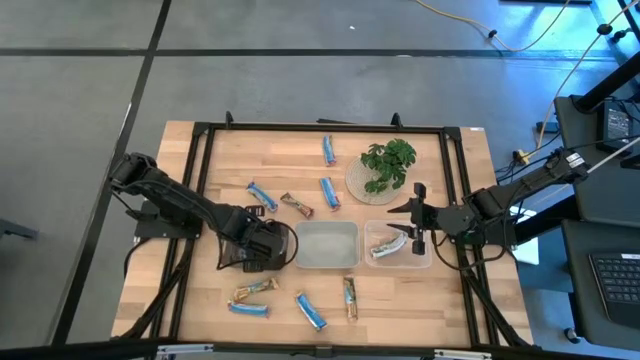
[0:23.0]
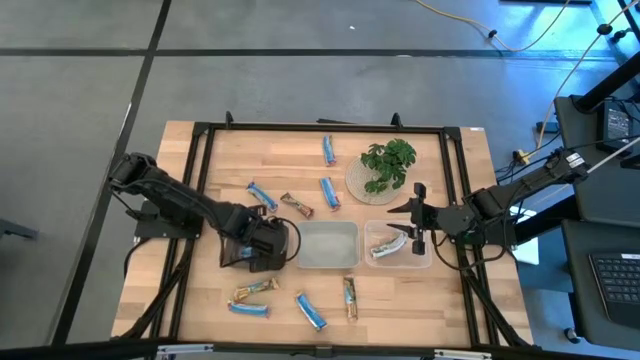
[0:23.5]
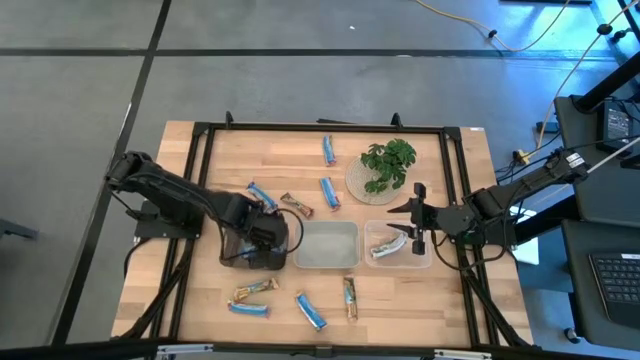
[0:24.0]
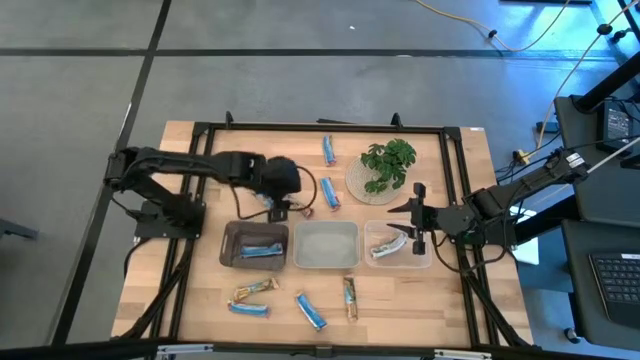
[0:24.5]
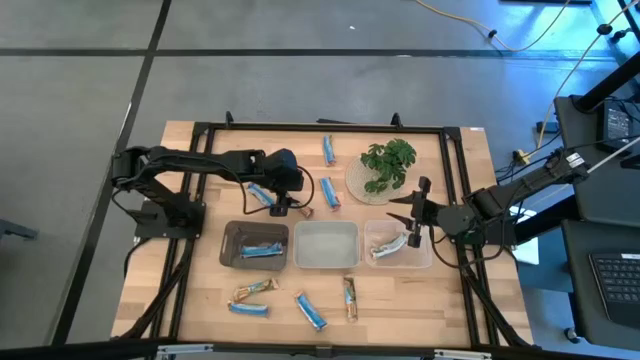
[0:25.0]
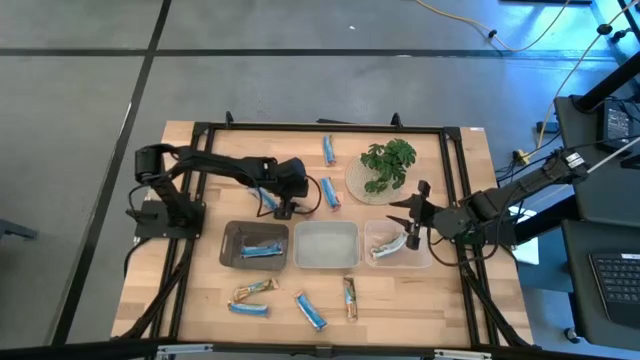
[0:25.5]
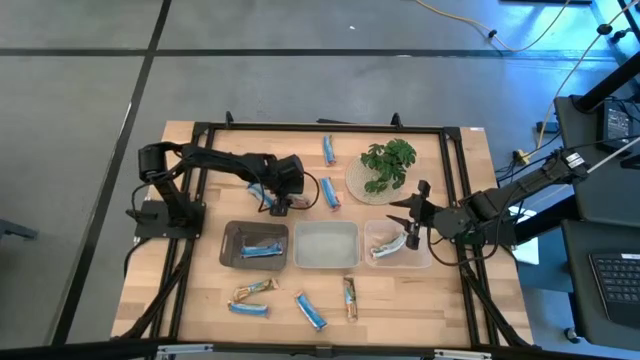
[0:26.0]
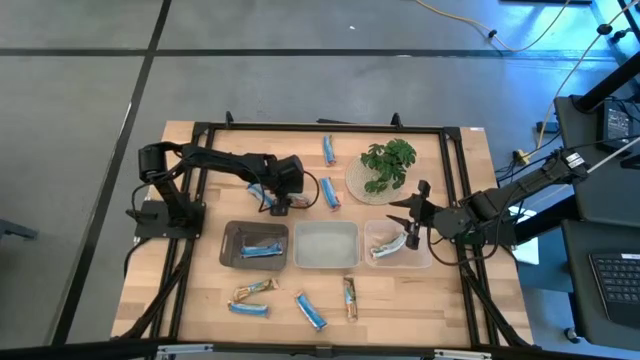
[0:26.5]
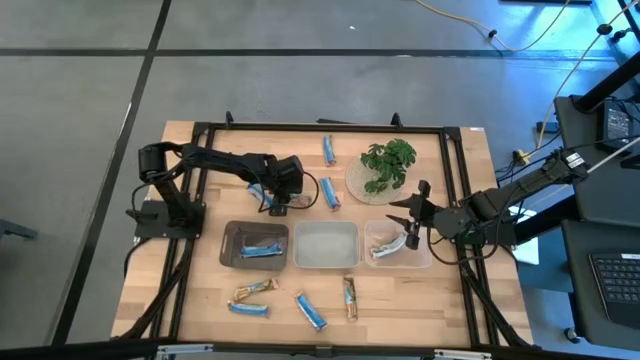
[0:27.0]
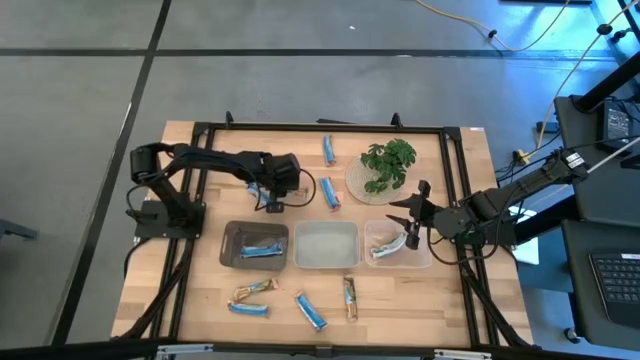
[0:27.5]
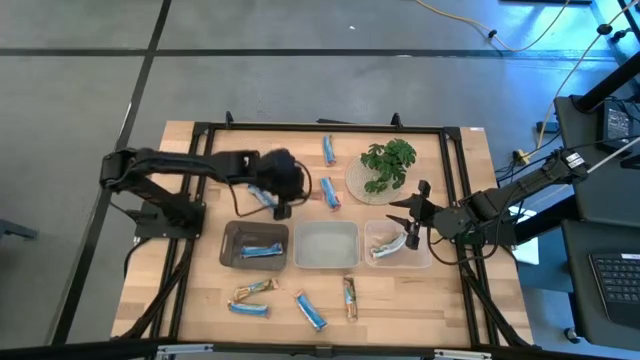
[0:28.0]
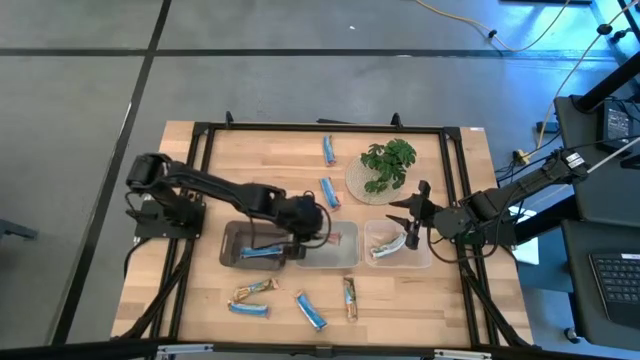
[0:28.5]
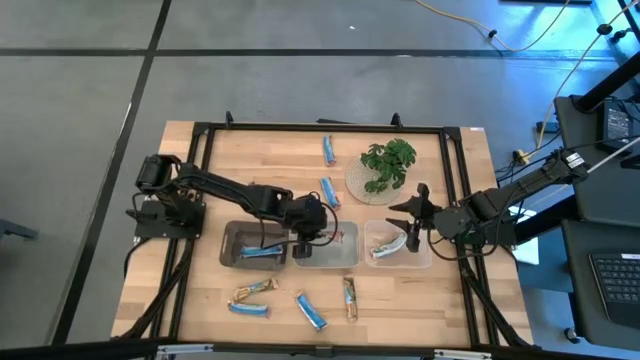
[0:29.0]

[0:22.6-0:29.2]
Task: Pick and place Granola Bars by type
Put the red granola bar into the gray bin

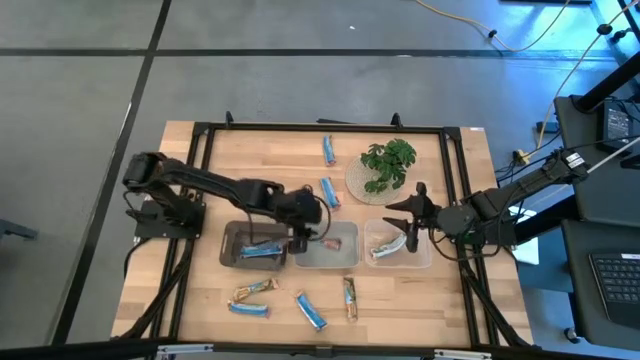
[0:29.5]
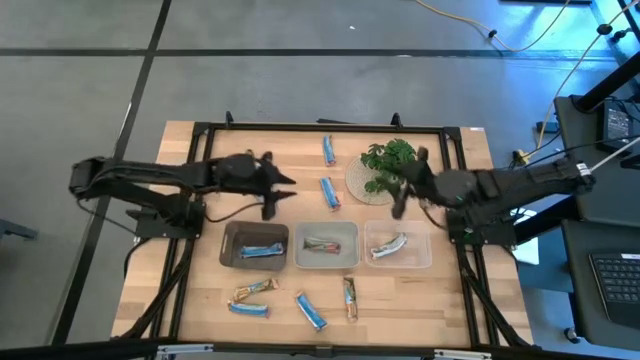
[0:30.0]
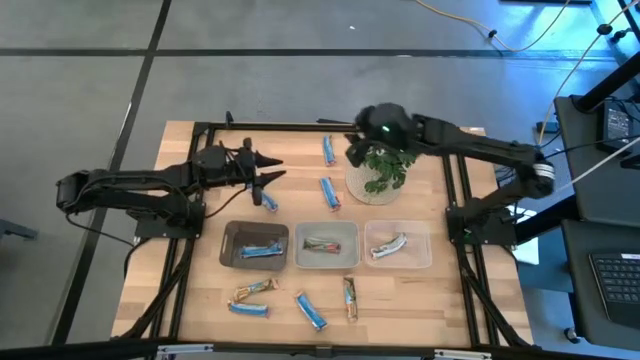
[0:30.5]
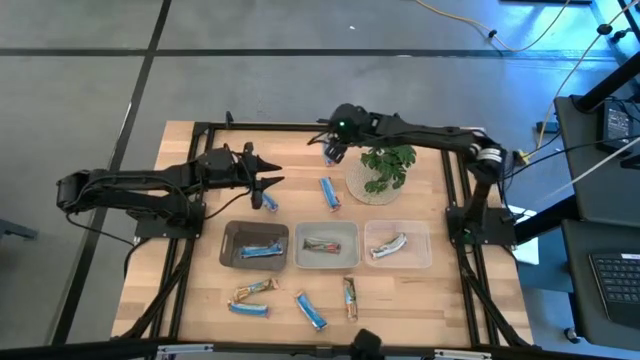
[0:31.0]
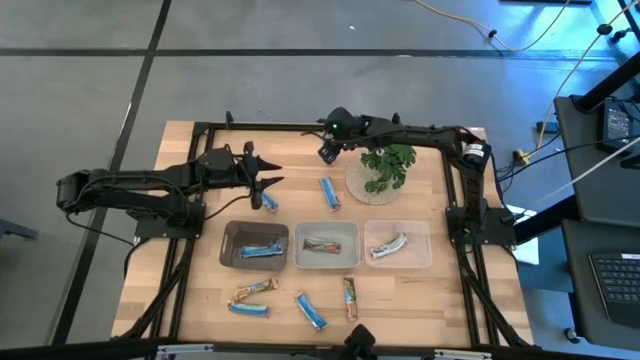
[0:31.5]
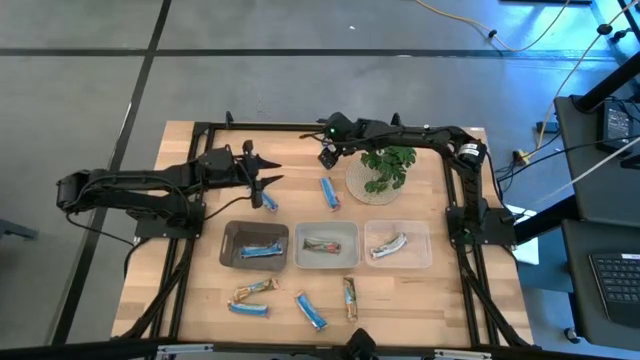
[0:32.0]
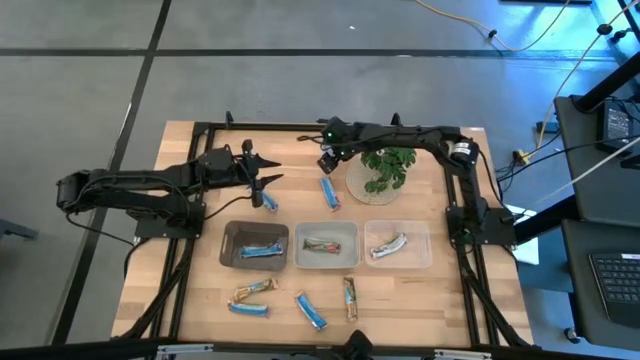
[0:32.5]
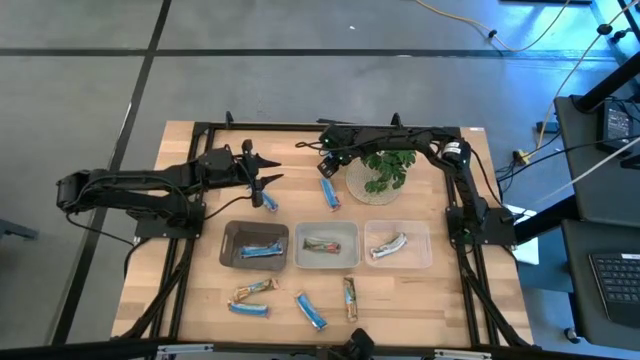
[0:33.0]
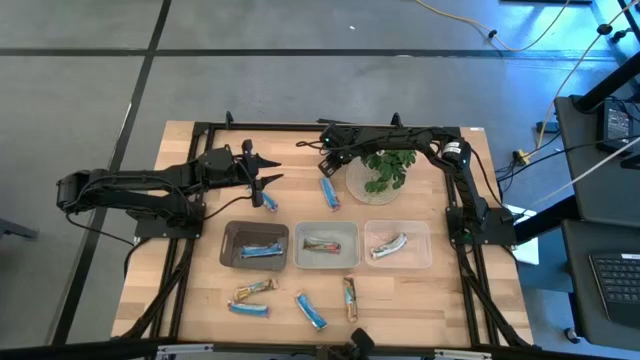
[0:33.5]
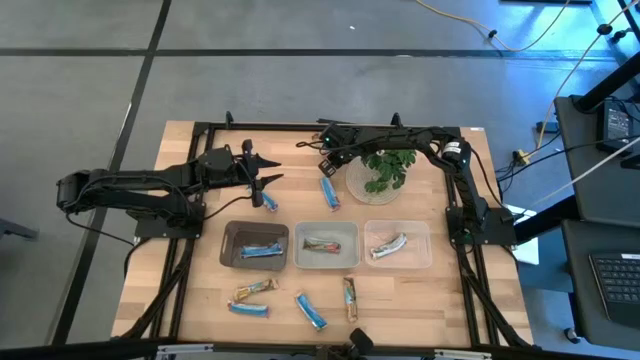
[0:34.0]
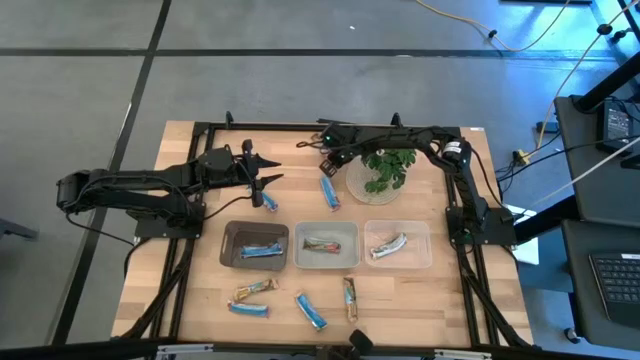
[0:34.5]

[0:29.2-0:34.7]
Put the red granola bar into the gray bin

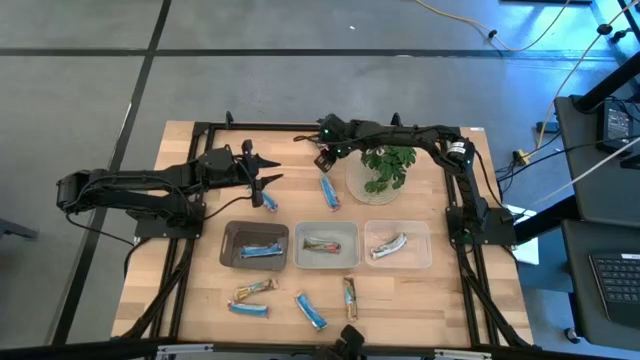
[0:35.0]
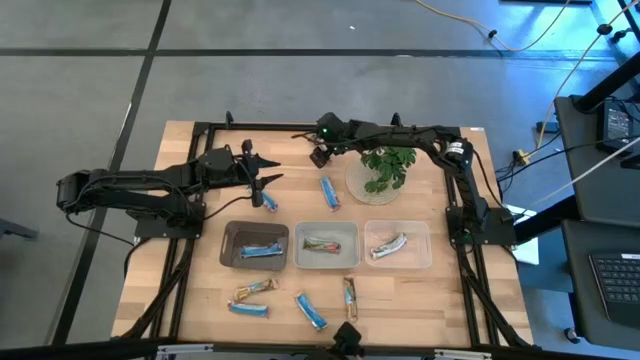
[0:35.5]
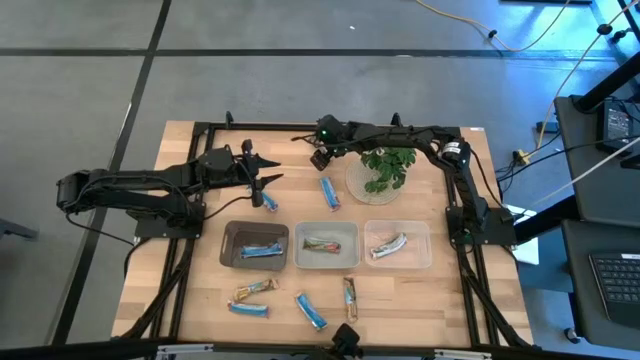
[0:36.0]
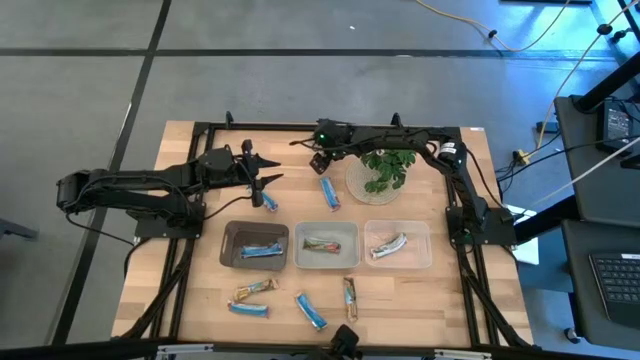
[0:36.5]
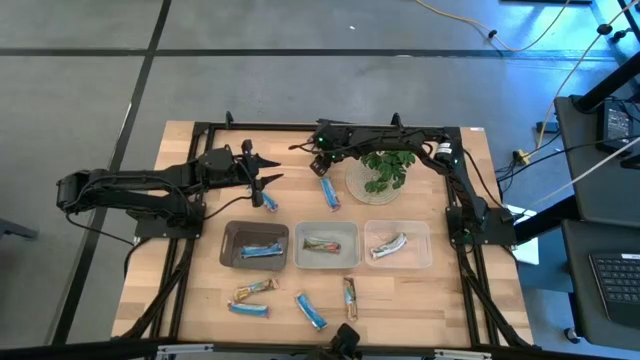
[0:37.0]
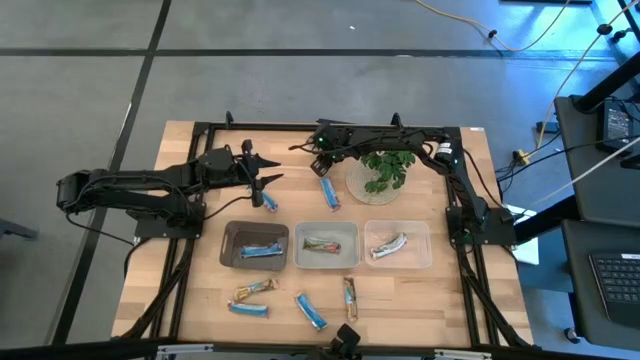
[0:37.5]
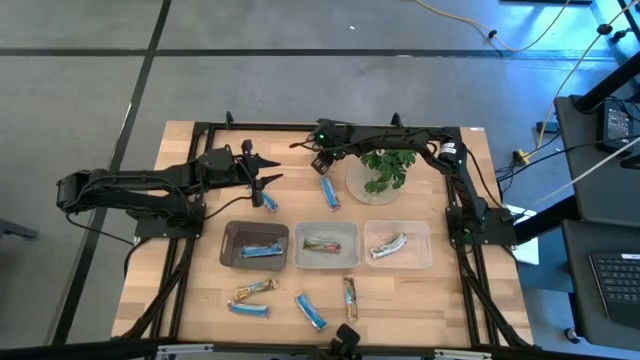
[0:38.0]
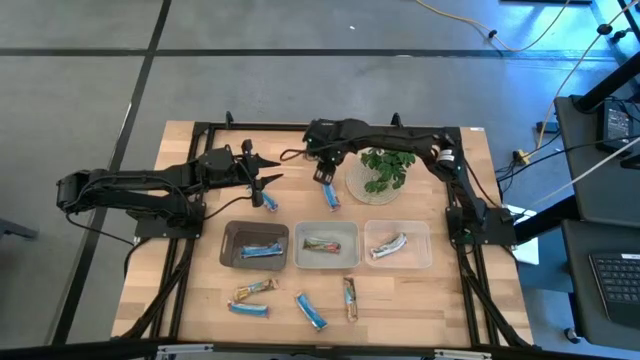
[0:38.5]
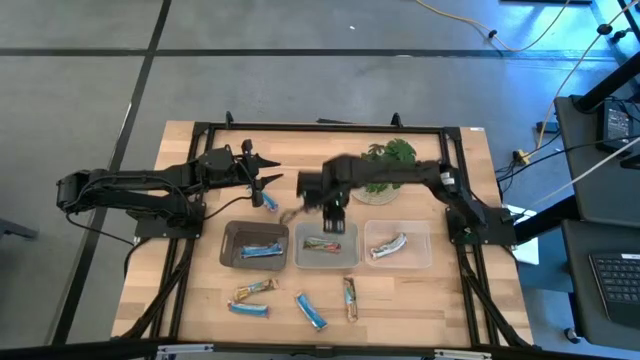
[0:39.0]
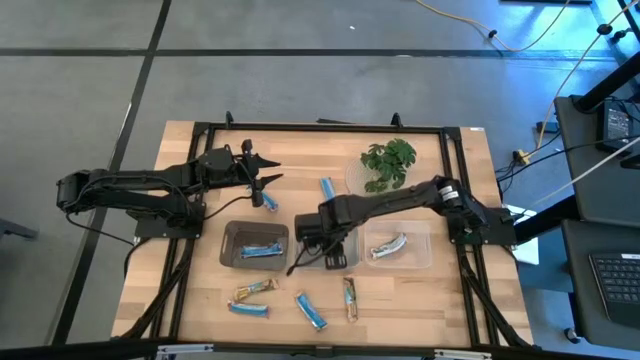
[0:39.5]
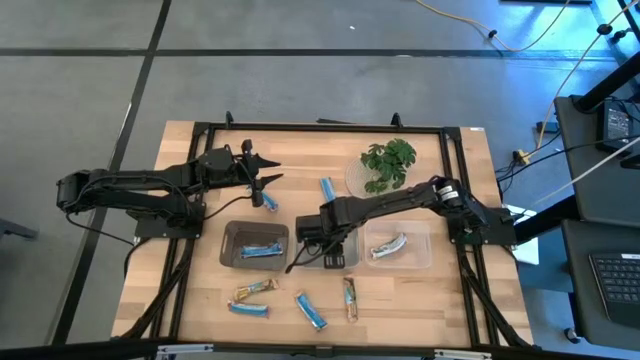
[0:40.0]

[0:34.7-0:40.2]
Put the red granola bar into the gray bin
